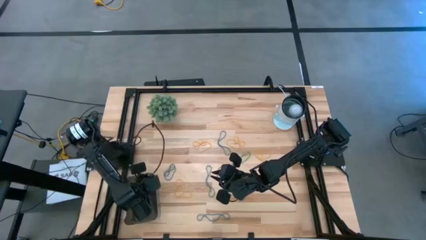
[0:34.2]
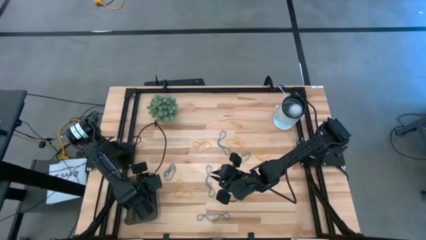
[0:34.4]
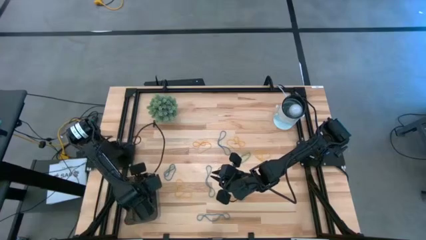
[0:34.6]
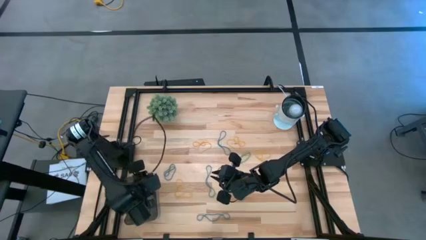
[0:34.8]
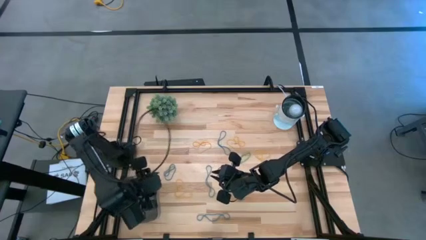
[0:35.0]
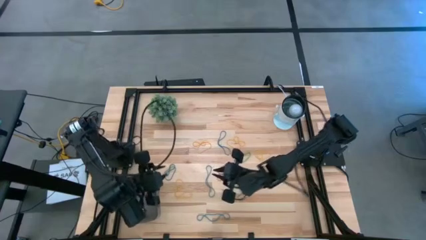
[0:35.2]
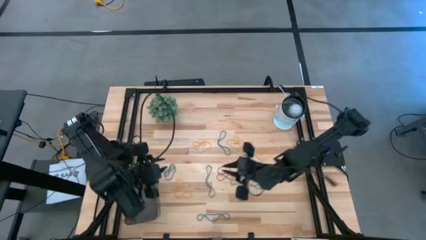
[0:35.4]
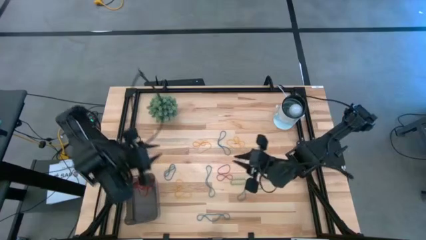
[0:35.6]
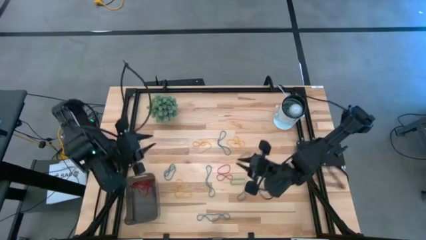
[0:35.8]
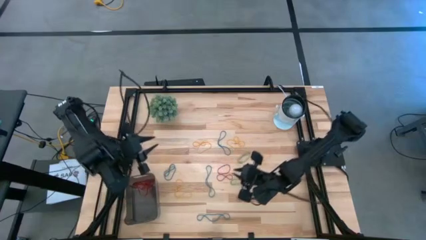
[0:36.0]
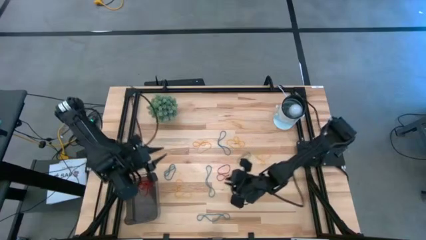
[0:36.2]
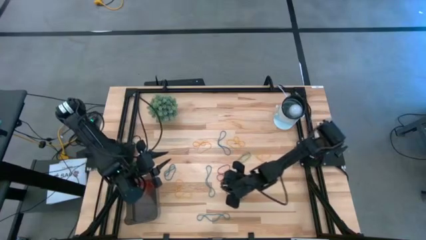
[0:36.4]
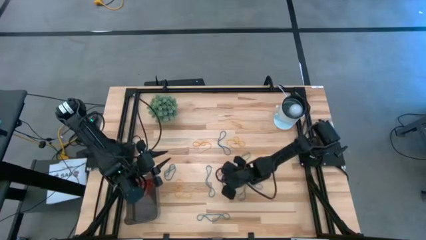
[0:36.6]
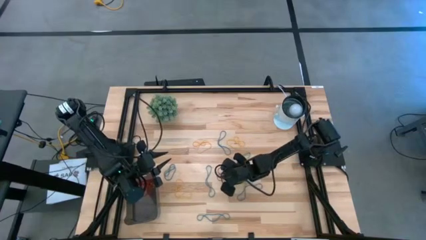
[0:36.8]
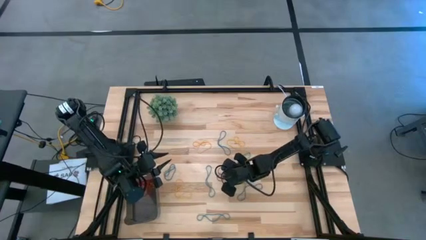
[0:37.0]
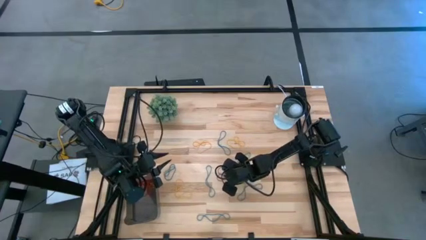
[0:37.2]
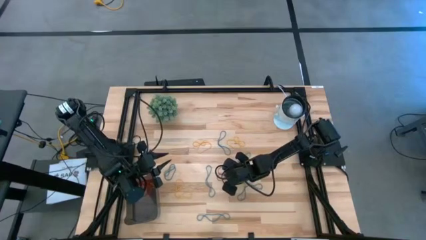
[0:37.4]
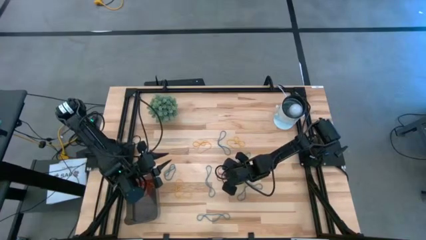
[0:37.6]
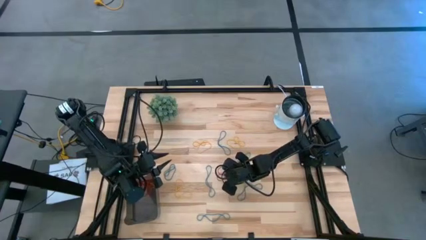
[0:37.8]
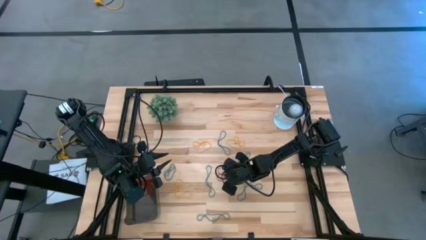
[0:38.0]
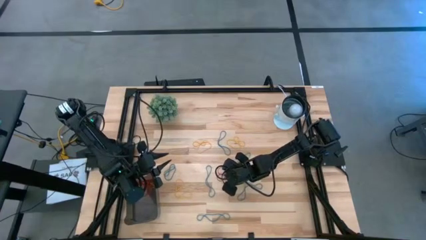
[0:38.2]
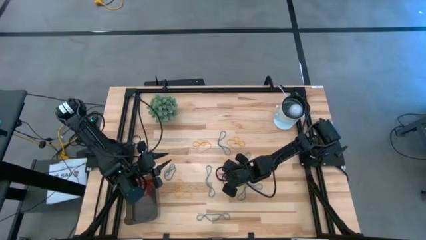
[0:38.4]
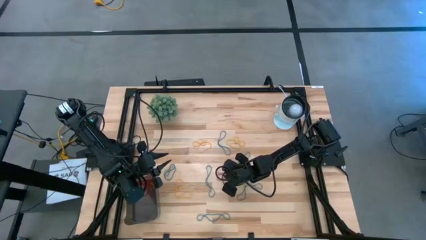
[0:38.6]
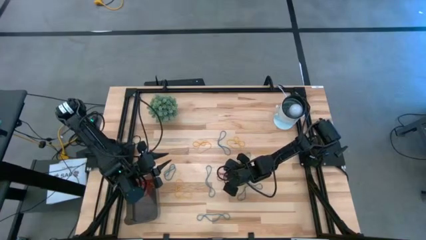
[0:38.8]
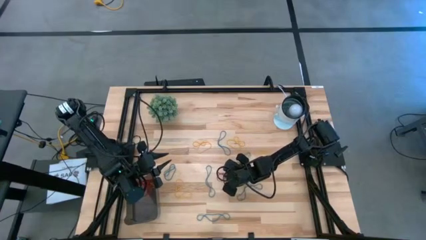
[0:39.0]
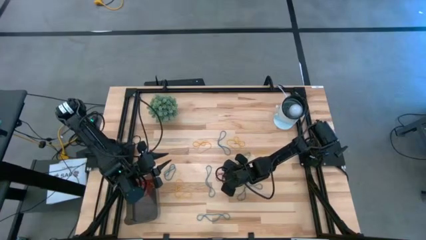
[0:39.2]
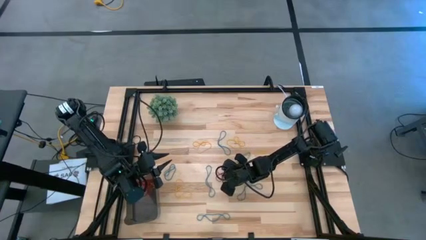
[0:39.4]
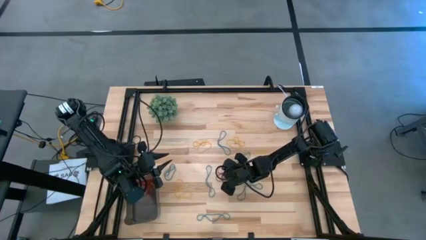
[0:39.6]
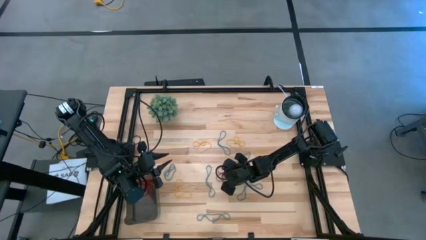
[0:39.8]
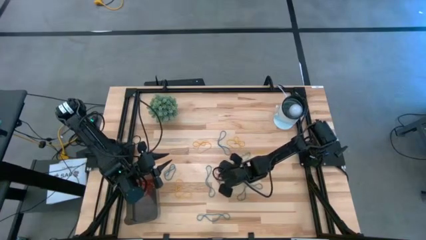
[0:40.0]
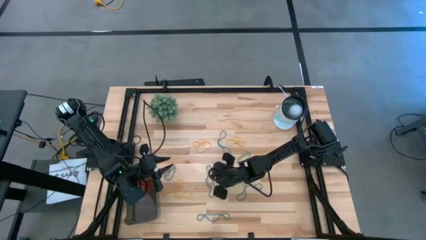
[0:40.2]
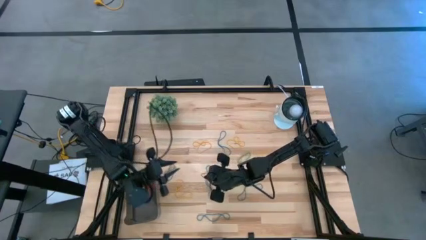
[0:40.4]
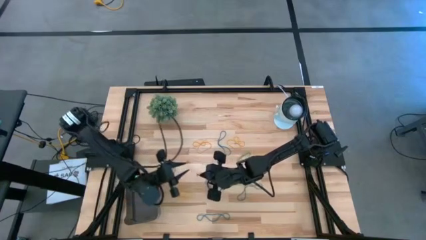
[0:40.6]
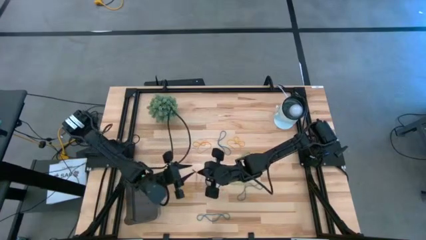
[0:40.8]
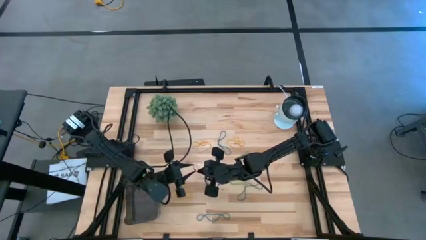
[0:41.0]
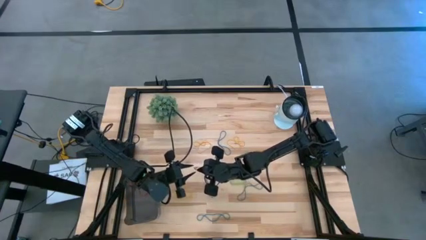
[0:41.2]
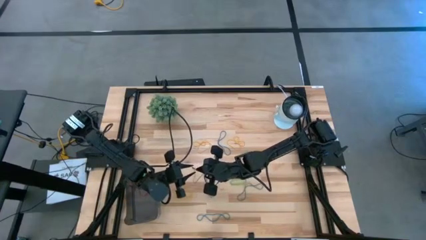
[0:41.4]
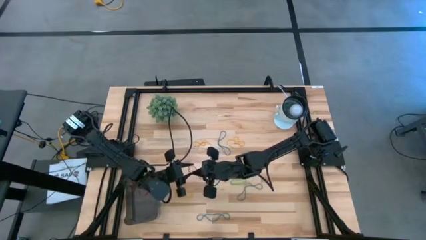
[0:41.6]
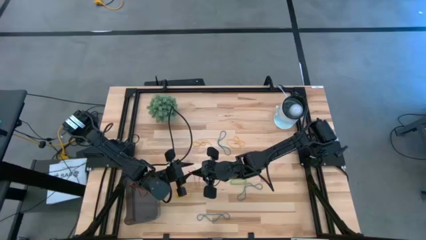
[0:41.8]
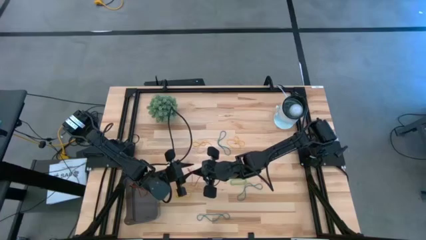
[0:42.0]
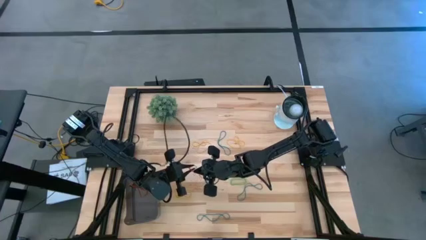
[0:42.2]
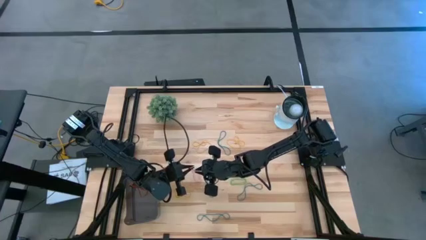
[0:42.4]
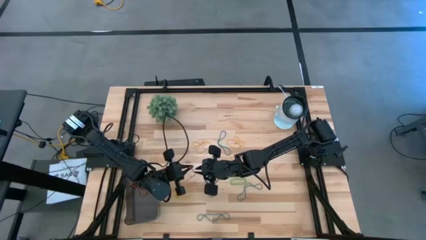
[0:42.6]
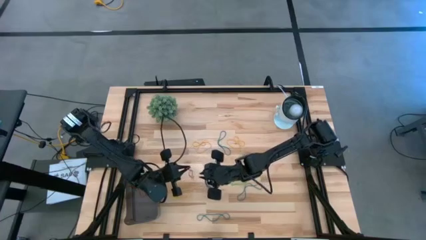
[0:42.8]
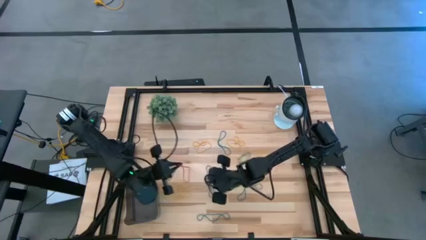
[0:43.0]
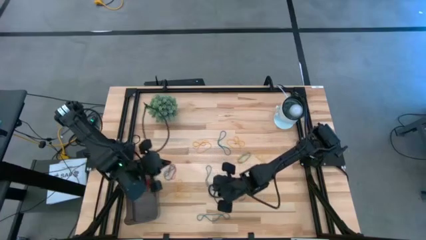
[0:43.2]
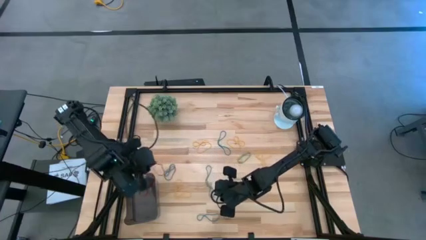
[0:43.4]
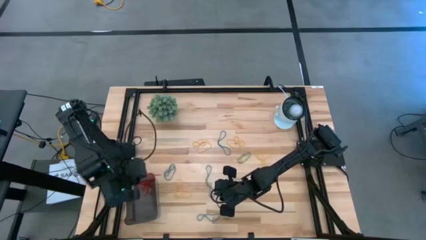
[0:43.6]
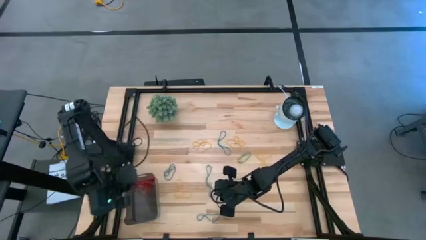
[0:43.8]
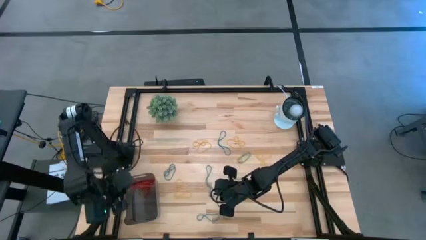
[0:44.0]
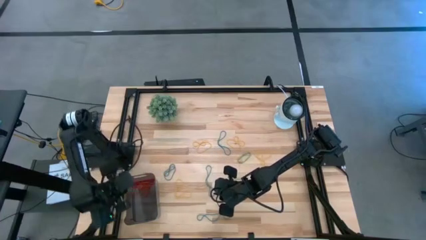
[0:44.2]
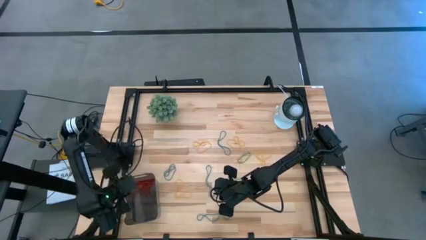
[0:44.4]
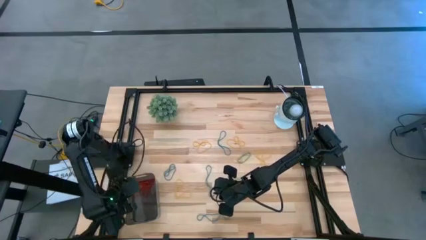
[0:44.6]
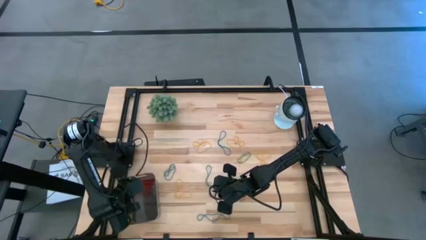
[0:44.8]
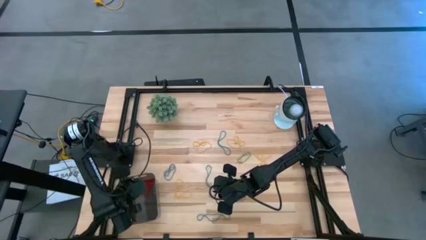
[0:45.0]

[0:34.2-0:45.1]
Task: Pick and place items into bin
Put the red rubber band into the black bin

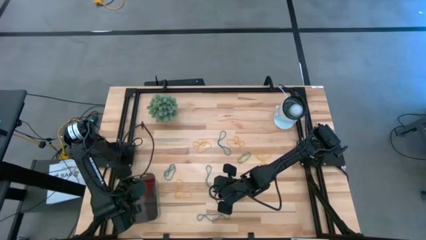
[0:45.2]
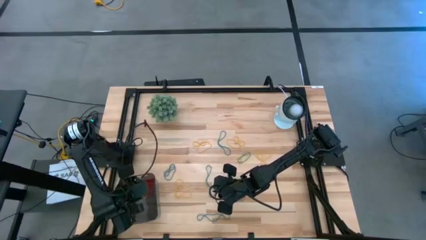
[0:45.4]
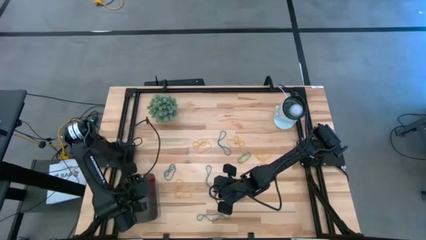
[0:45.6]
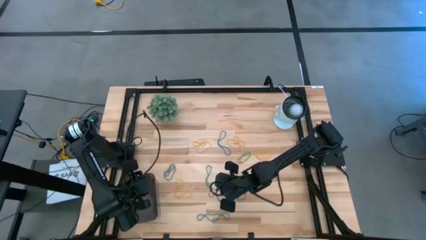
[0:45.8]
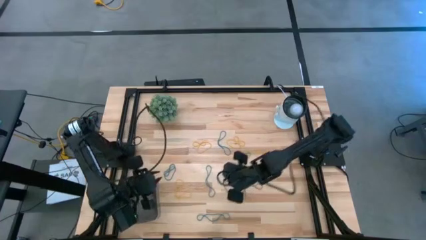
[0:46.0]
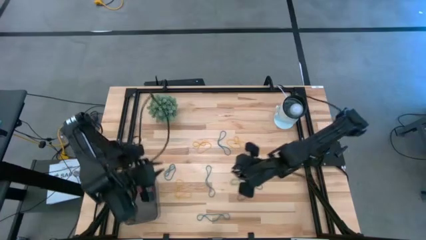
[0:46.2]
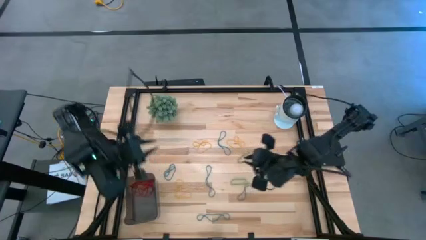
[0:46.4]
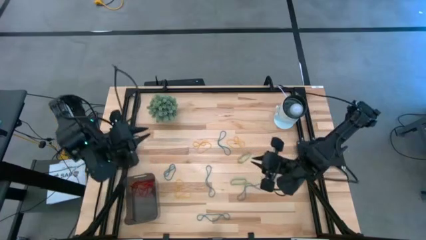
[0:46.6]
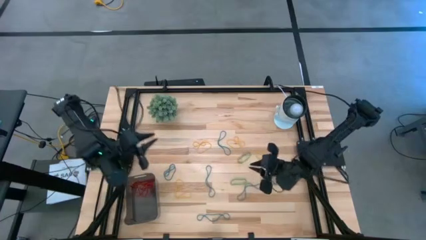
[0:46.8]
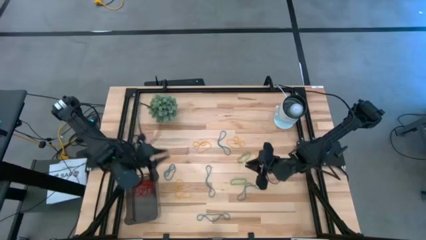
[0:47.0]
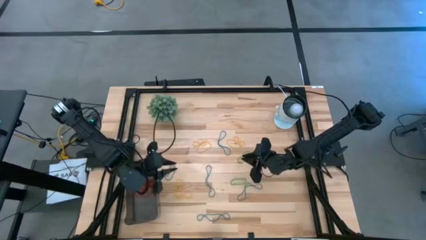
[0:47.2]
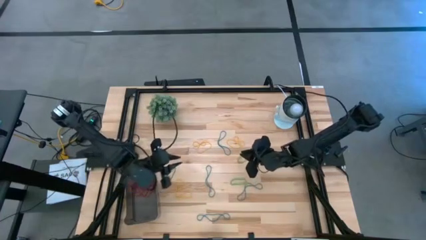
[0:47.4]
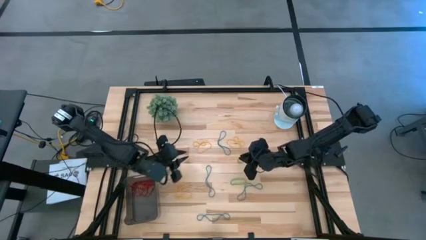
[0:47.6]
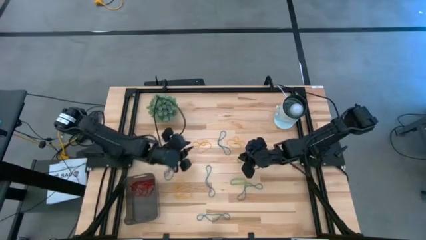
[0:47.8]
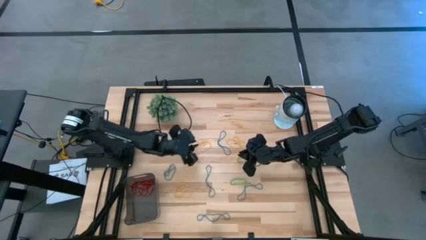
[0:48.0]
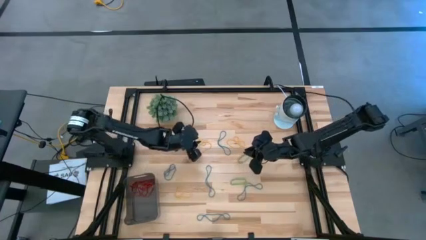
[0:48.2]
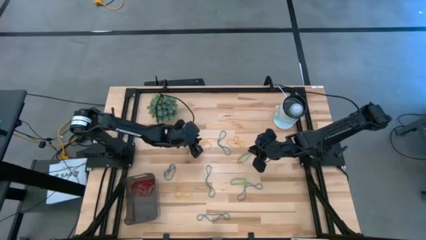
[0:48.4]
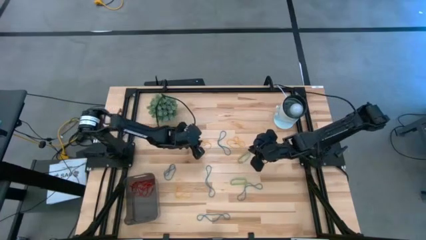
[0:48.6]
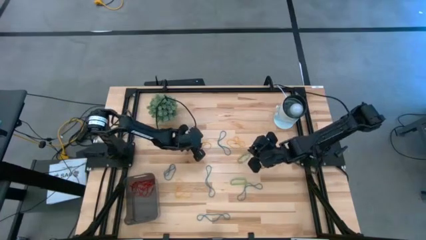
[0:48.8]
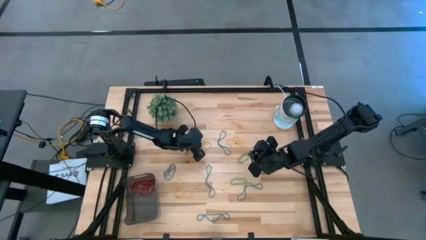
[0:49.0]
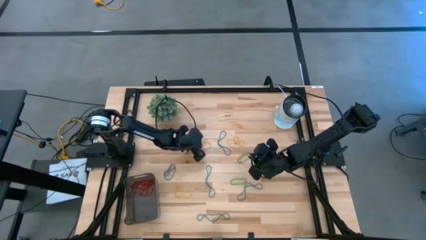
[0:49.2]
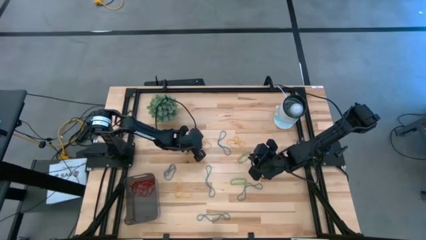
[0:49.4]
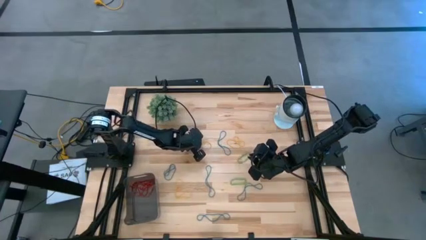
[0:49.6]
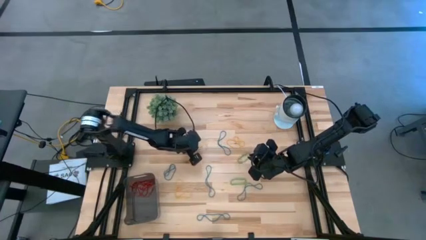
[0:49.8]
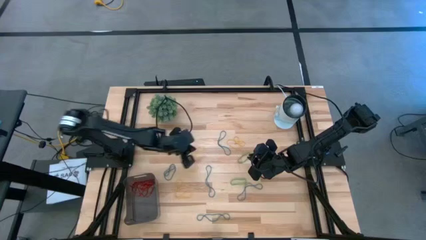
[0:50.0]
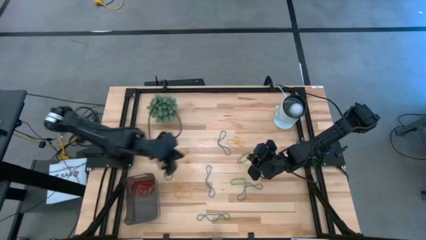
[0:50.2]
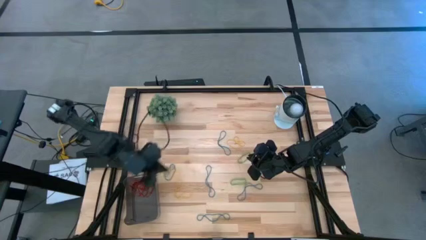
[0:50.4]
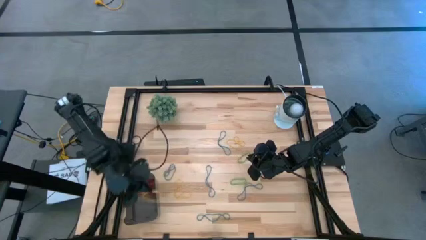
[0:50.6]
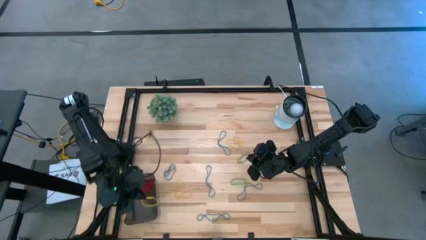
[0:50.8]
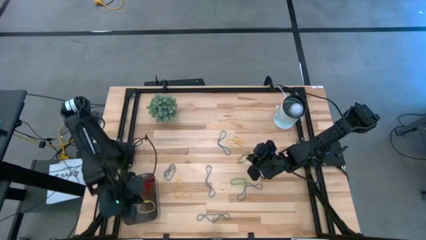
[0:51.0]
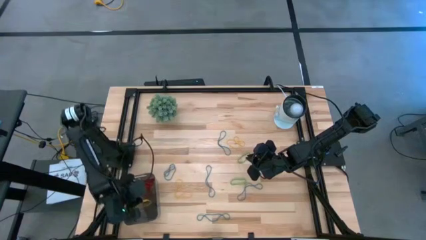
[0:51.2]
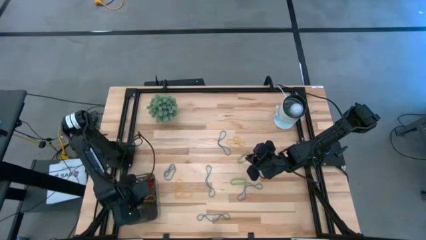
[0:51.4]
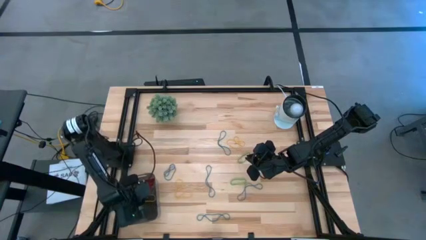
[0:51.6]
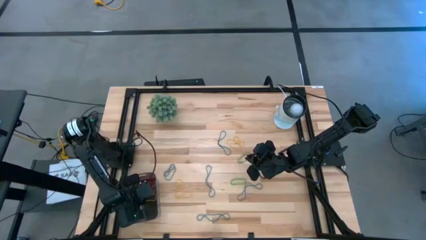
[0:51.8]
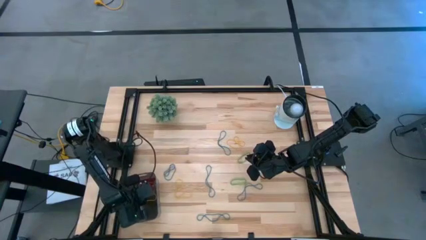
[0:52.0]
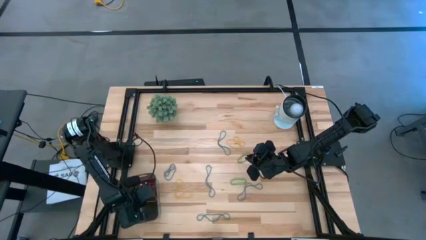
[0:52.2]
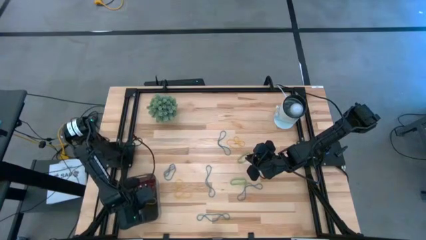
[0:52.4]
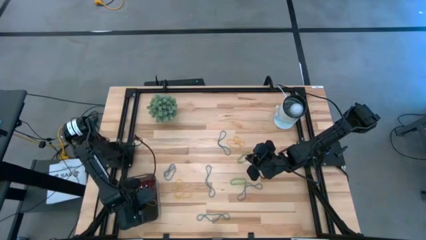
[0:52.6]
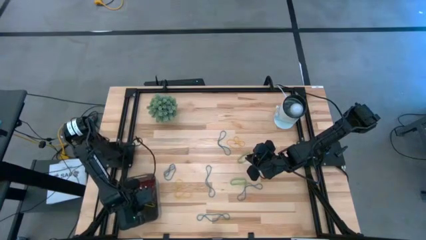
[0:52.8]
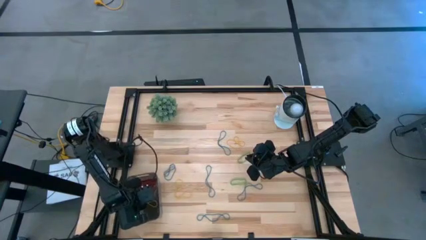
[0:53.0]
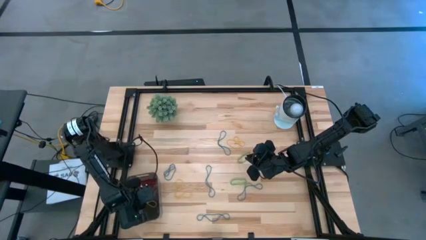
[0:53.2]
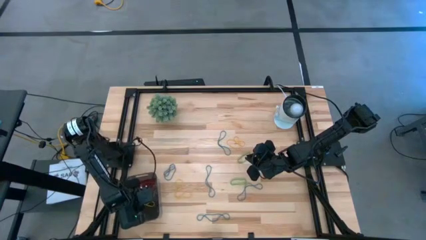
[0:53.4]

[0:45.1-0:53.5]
Put the yellow rubber band into the black bin
